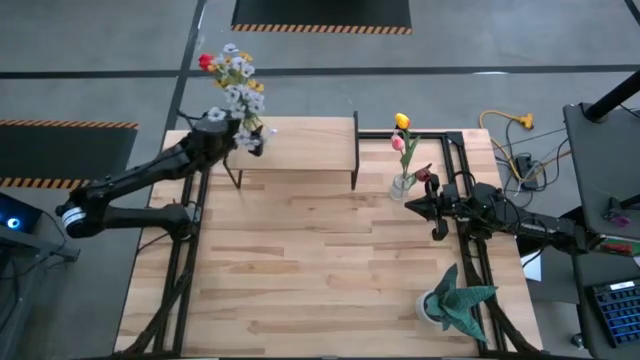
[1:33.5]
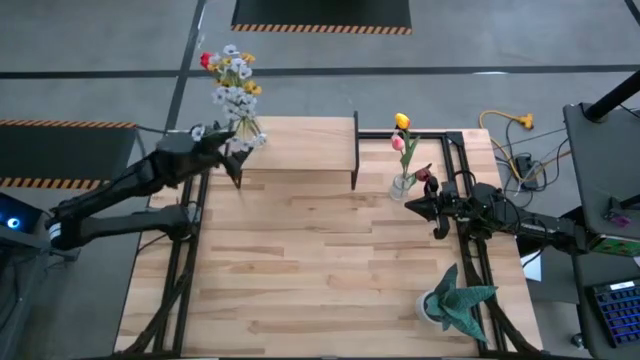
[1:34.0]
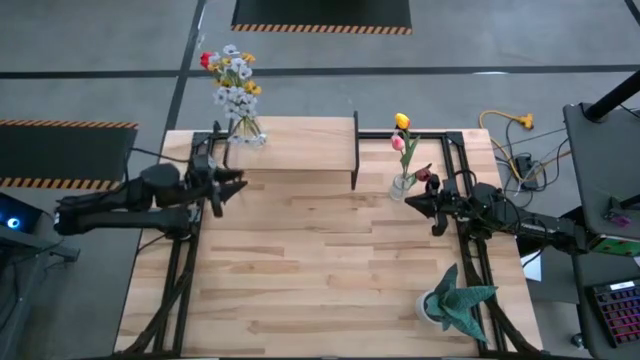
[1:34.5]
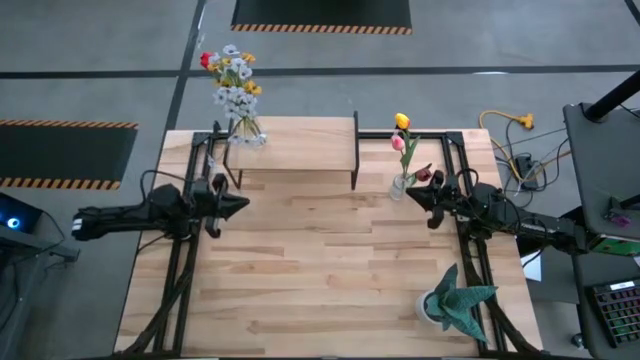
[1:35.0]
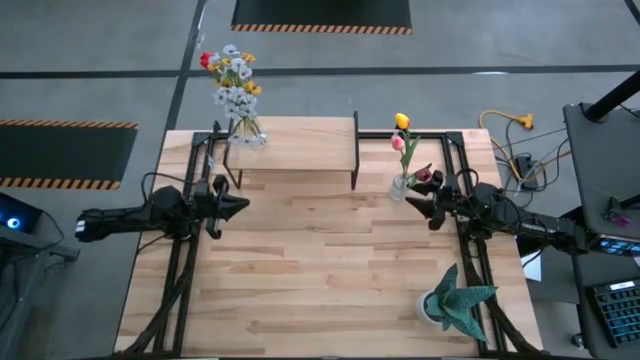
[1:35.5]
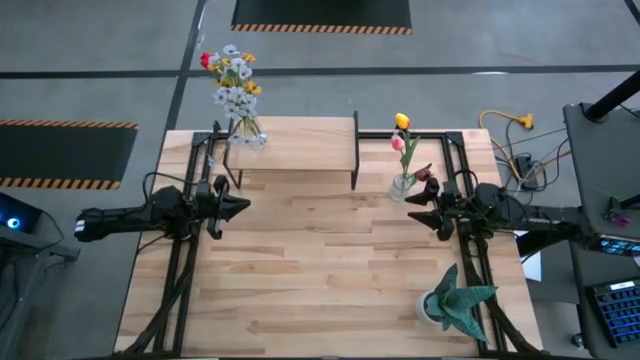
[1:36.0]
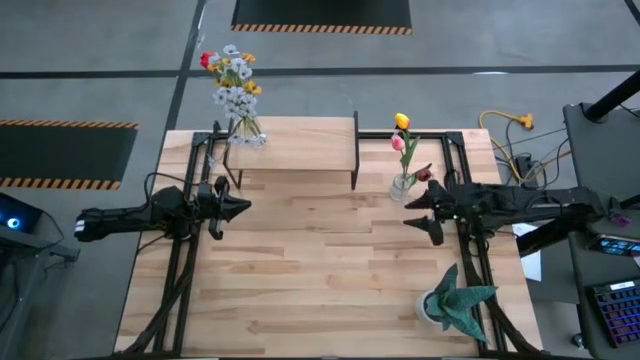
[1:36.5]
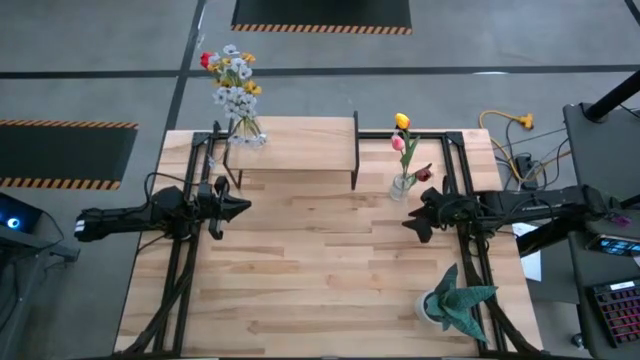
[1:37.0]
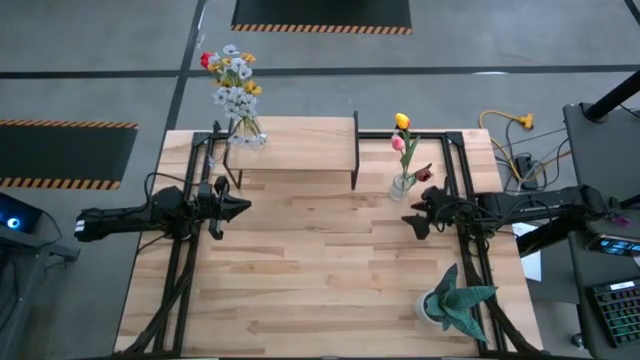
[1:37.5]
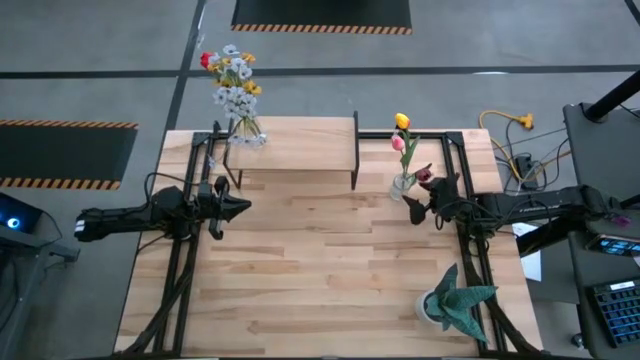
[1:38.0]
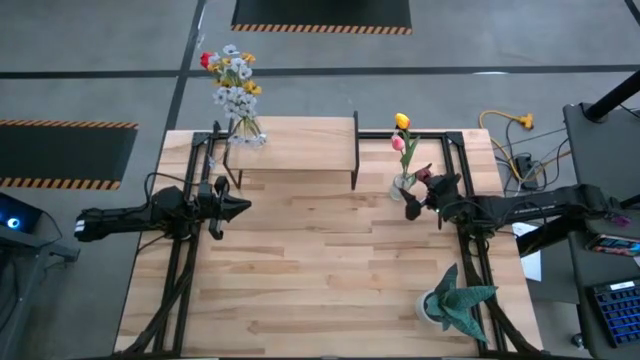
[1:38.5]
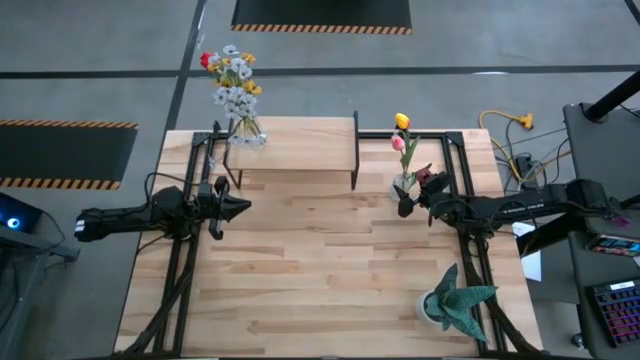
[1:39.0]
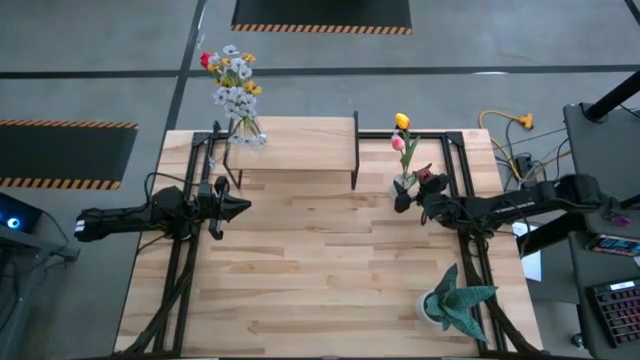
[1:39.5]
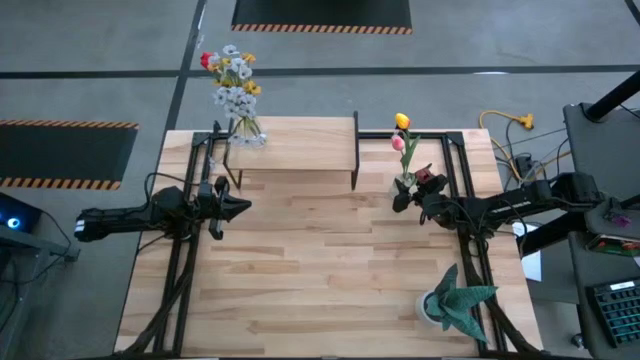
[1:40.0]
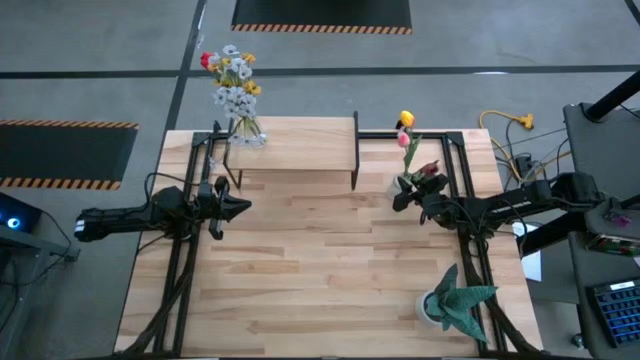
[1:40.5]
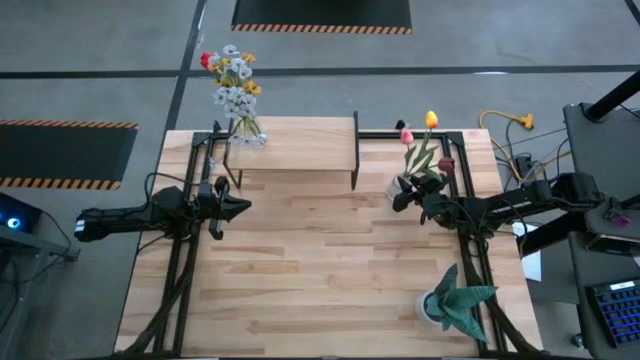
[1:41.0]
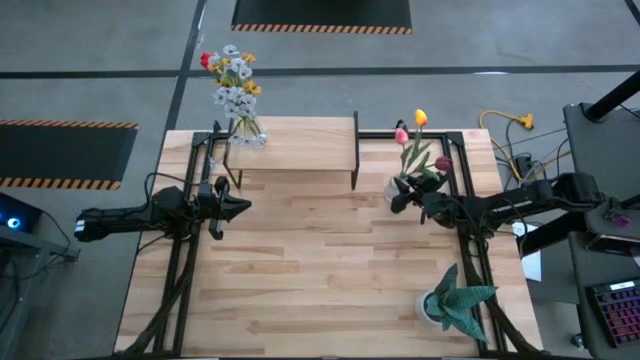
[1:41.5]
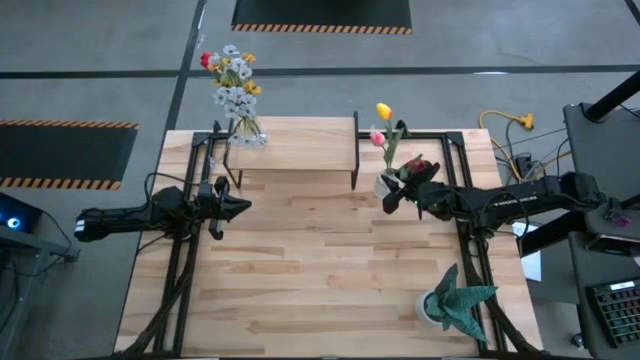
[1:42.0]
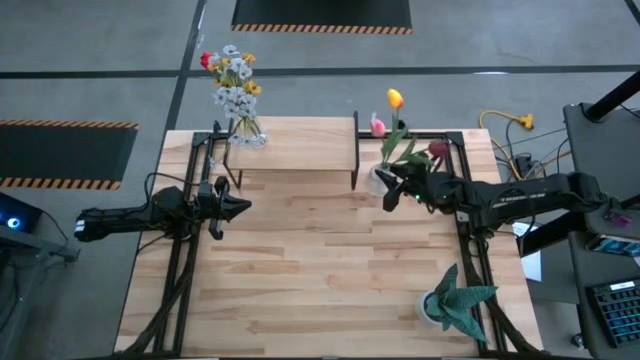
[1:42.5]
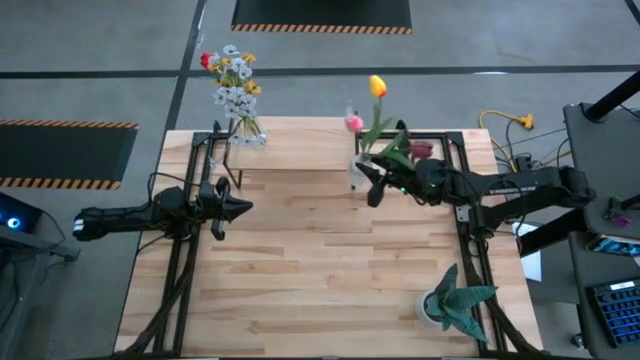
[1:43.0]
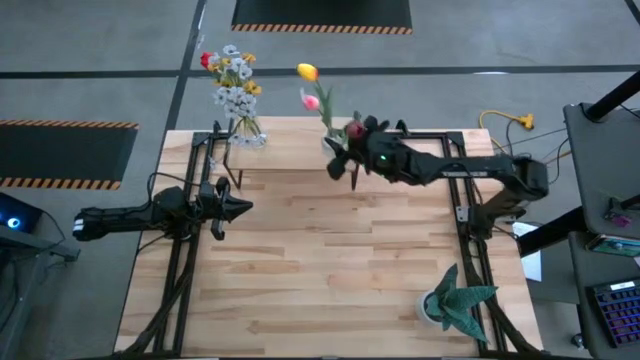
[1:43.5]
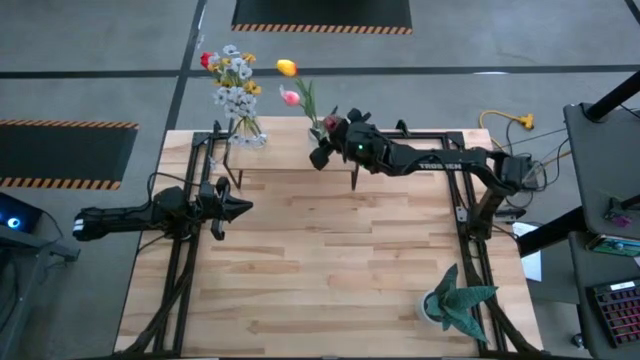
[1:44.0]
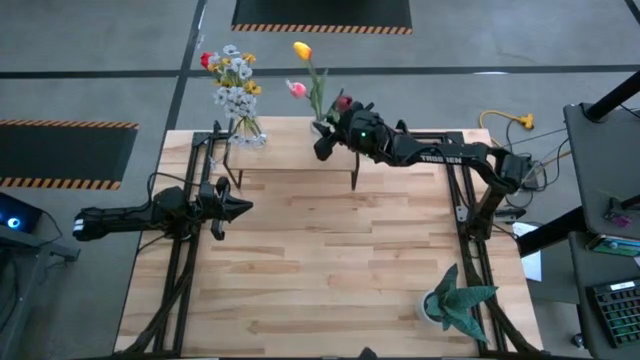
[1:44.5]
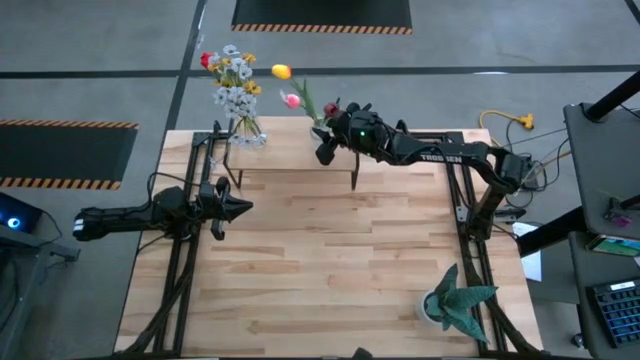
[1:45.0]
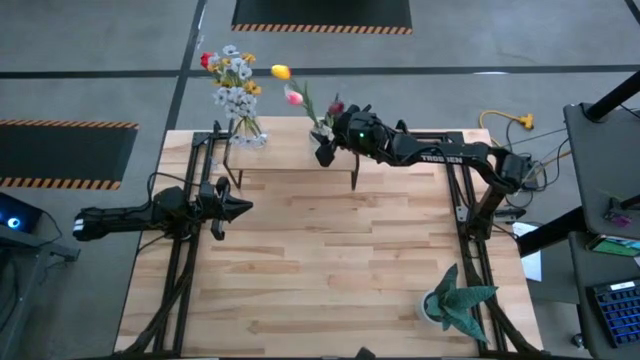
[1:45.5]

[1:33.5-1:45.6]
Task: Pick and place flowers into a vace then onto a shelf
Put the transparent vase on the shelf

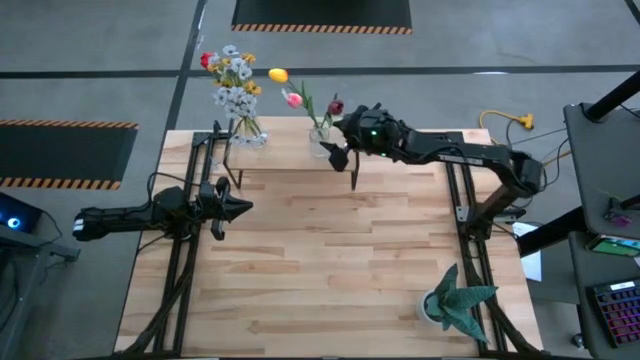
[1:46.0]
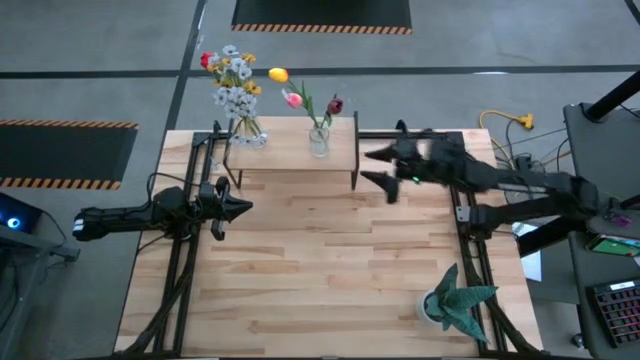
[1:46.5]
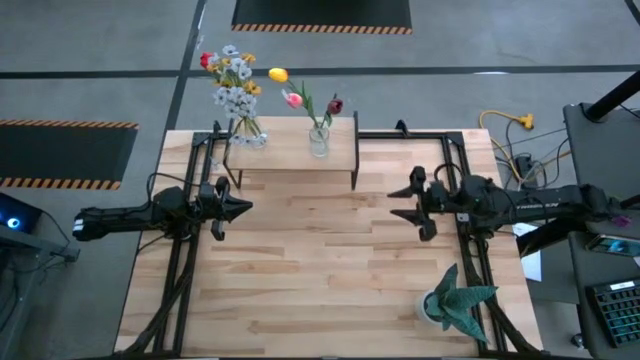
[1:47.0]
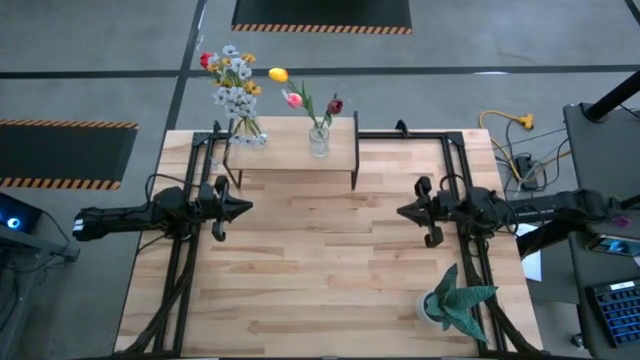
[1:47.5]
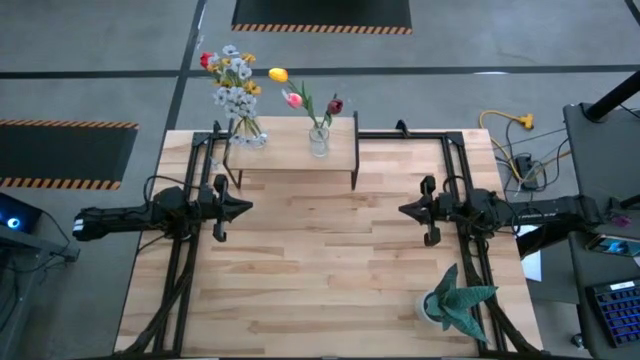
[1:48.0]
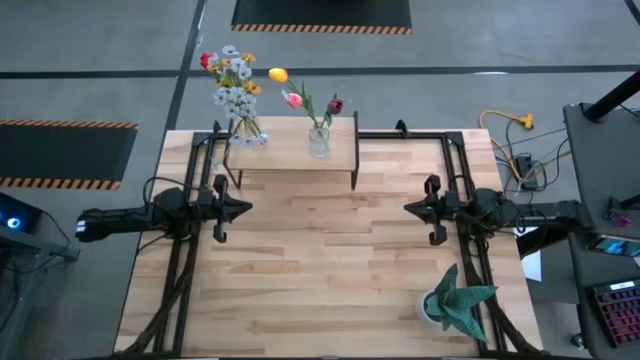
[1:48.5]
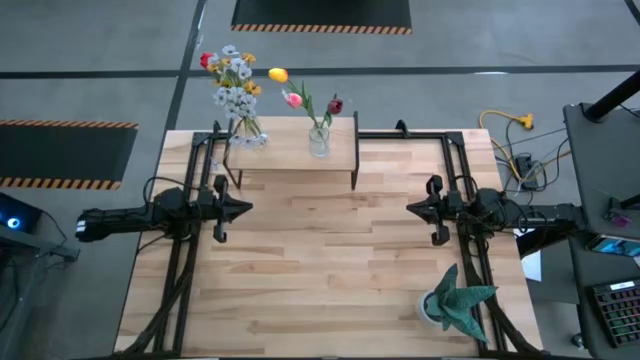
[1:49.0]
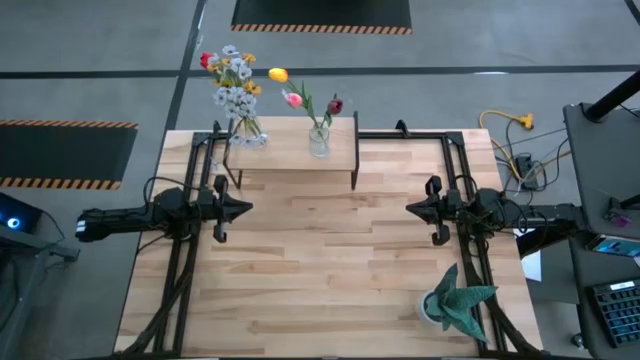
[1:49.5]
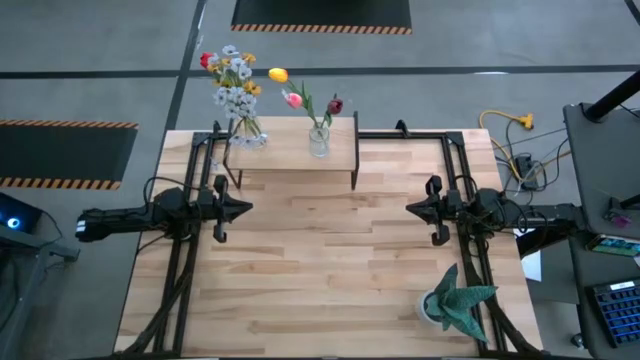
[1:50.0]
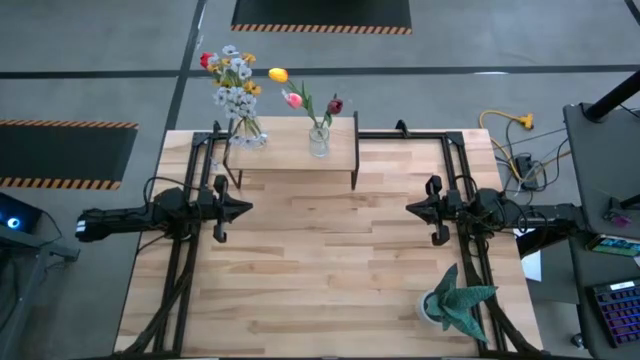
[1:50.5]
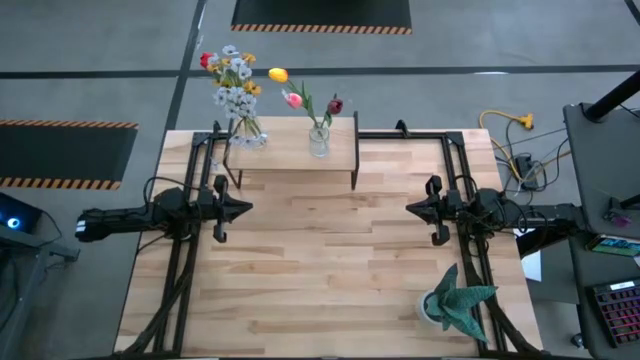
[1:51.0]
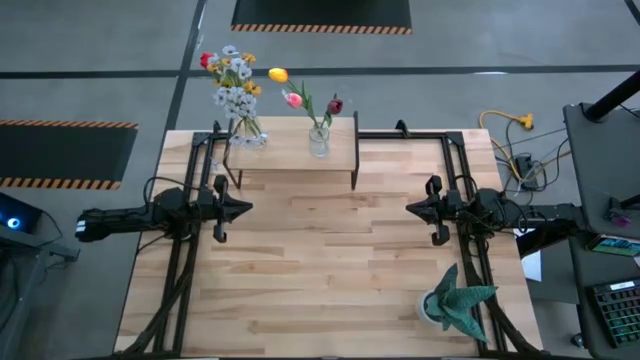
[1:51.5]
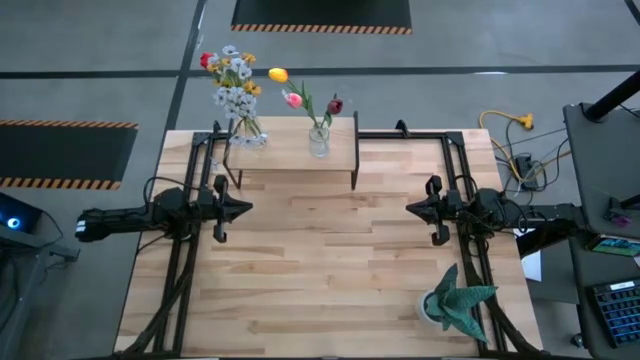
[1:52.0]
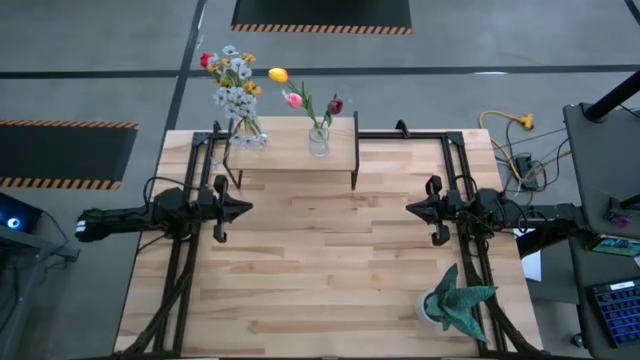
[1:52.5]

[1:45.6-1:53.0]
Return to Home Position

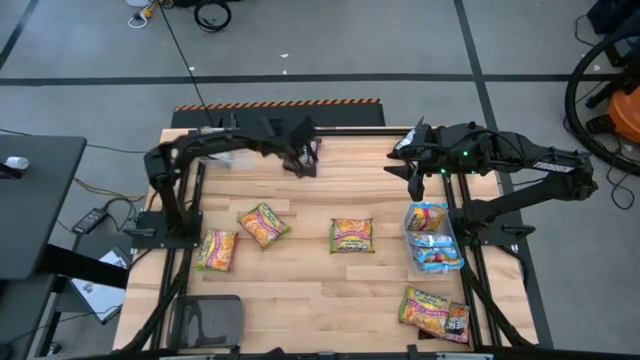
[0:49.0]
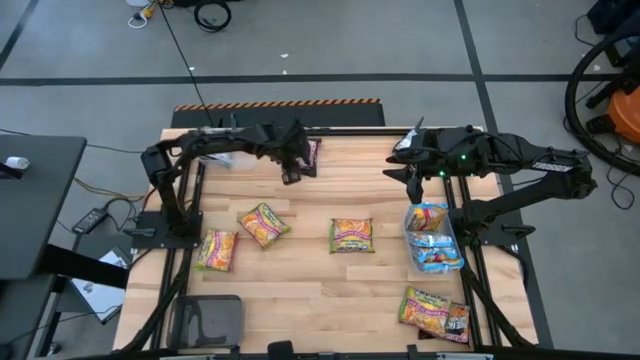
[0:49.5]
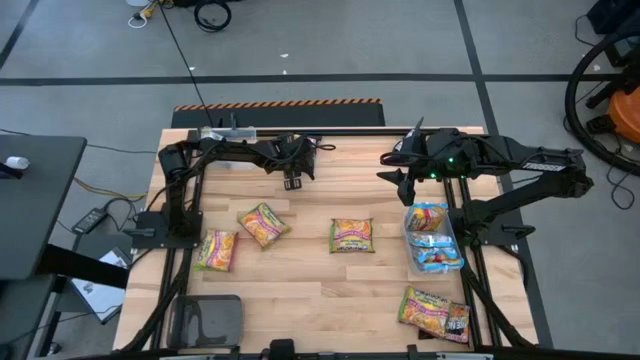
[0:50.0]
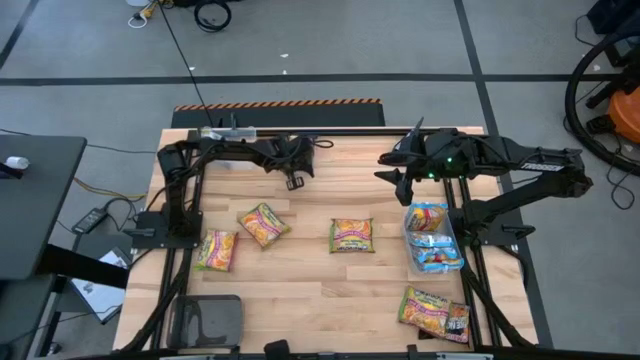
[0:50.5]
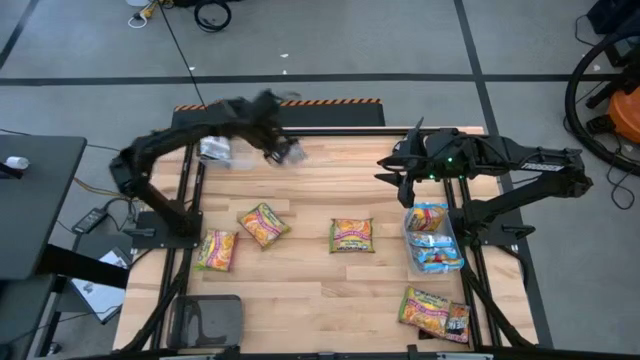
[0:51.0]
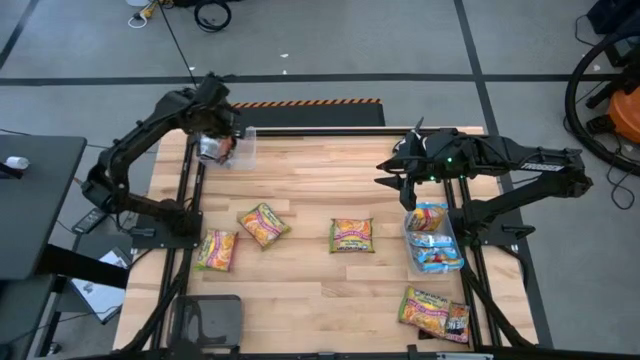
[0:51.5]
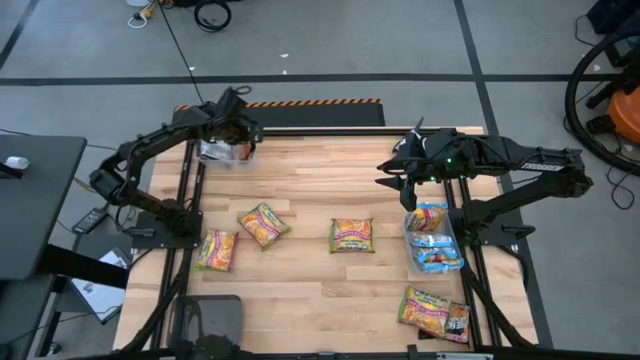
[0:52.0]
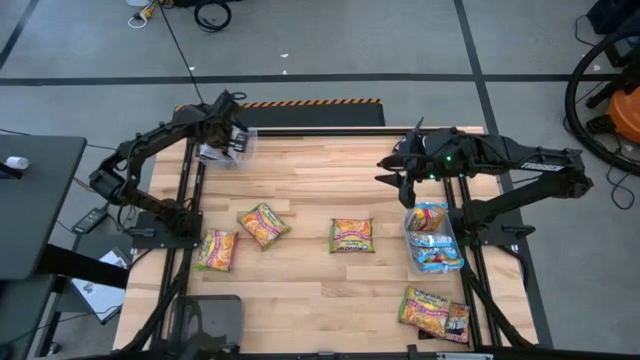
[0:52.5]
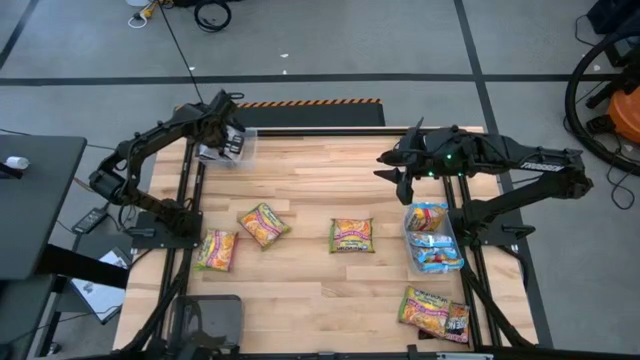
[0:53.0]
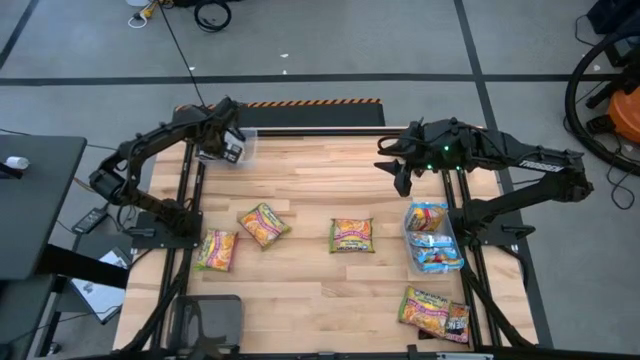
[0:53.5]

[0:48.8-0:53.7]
Task: Sort Maruchan noodles
Put the black noodle pack into the top transparent bin
